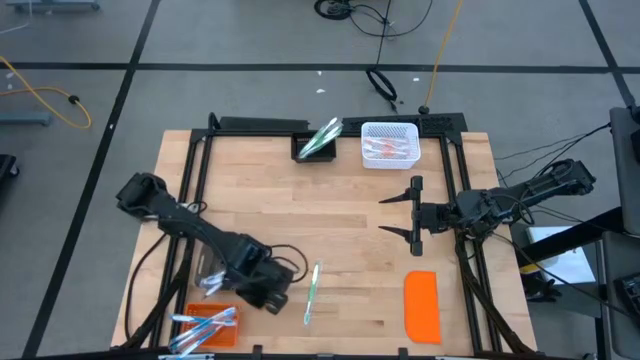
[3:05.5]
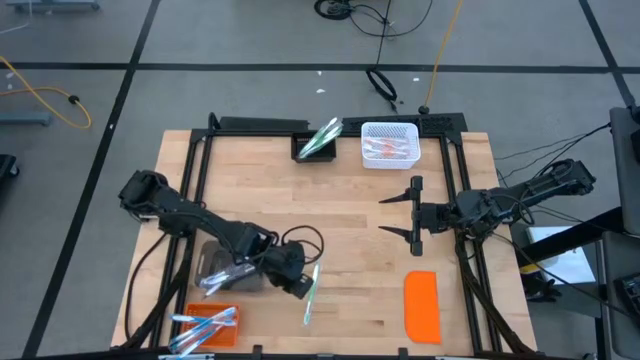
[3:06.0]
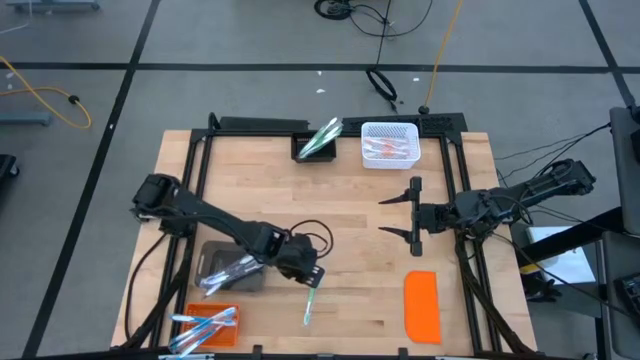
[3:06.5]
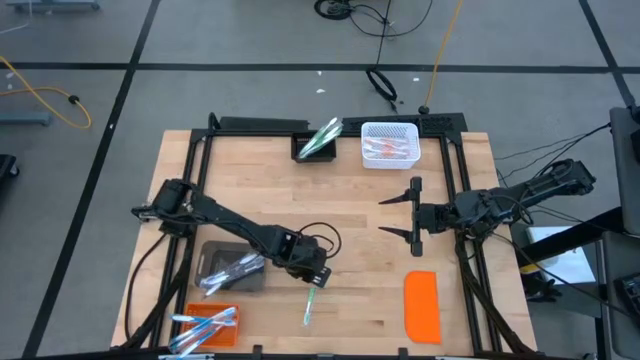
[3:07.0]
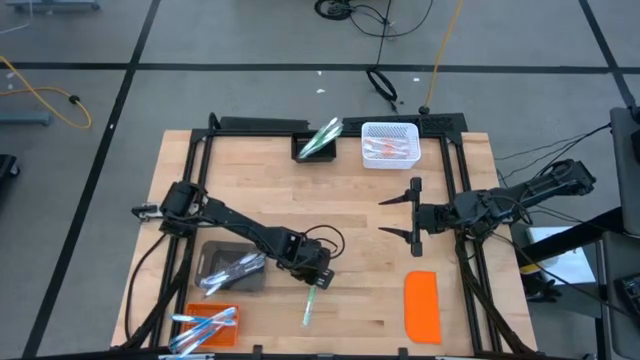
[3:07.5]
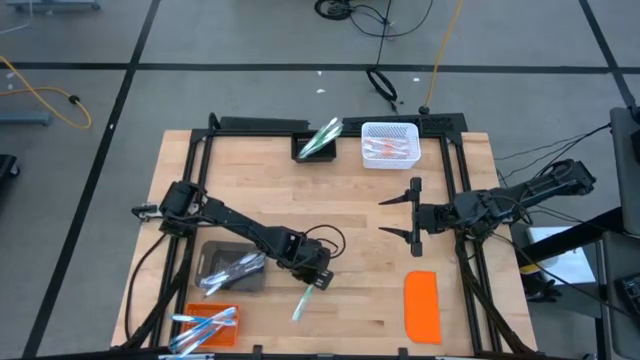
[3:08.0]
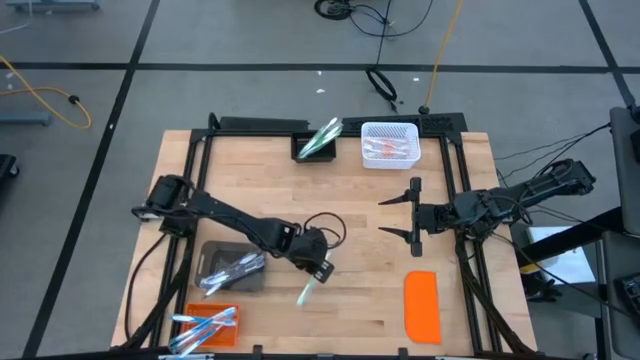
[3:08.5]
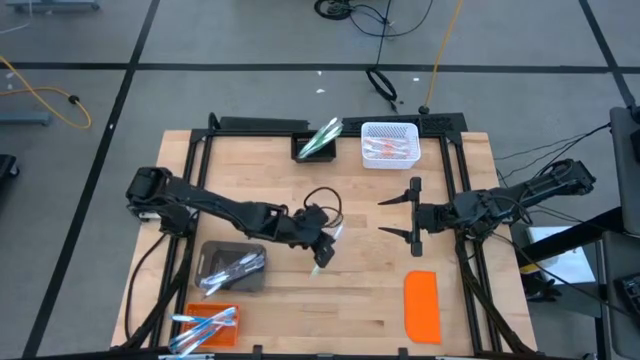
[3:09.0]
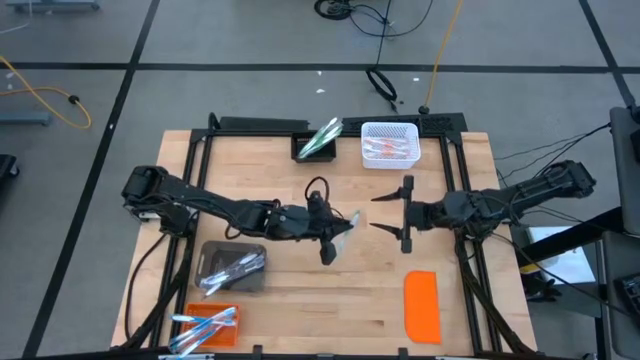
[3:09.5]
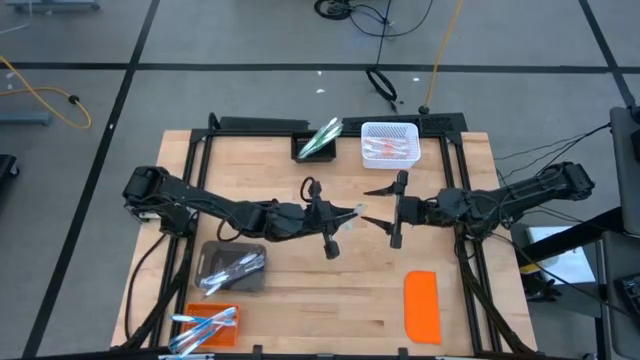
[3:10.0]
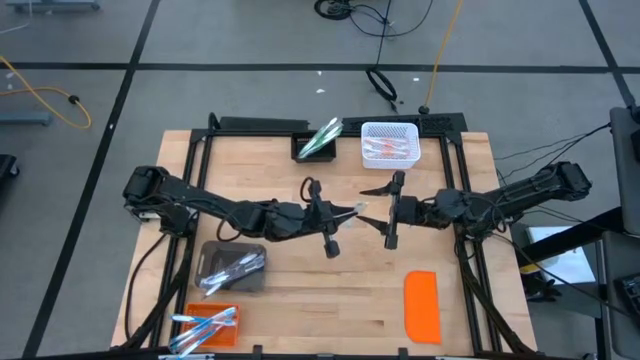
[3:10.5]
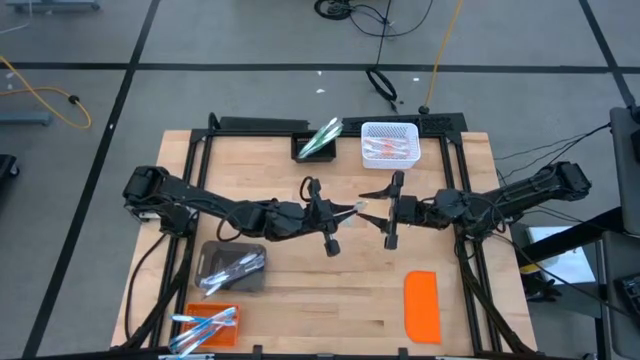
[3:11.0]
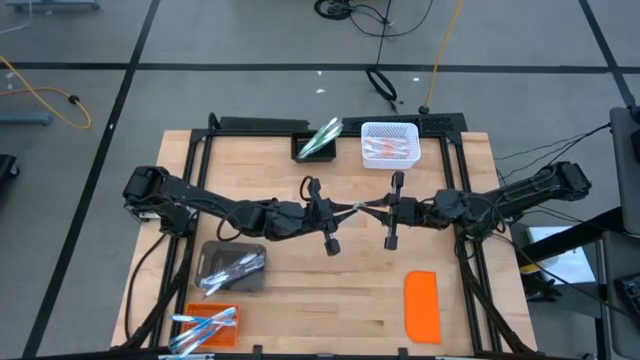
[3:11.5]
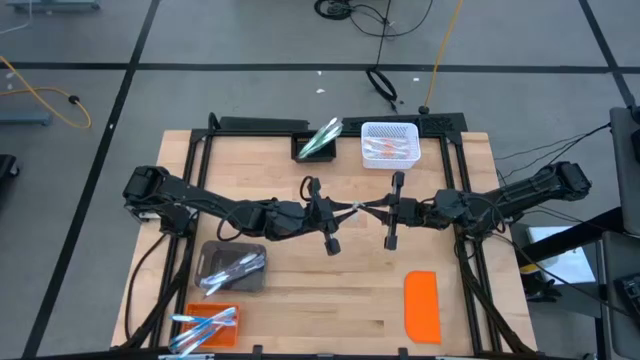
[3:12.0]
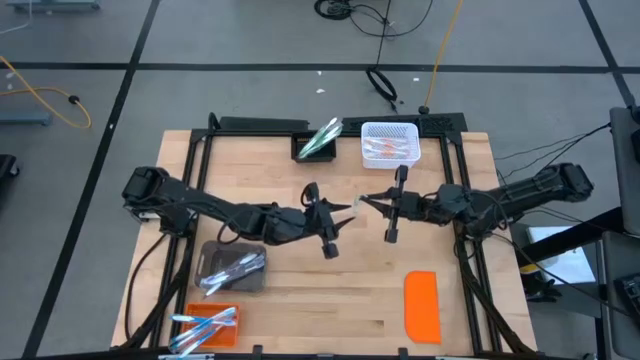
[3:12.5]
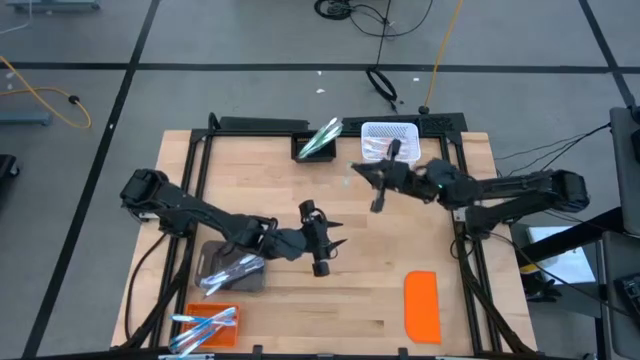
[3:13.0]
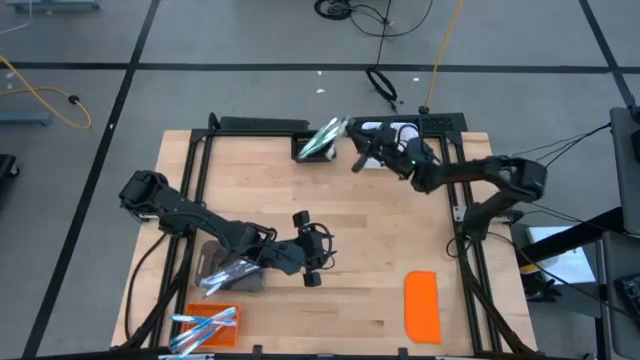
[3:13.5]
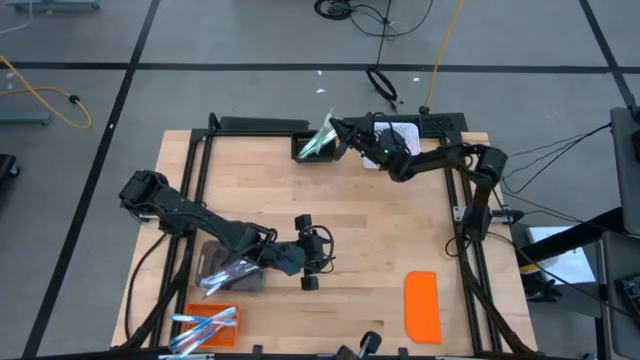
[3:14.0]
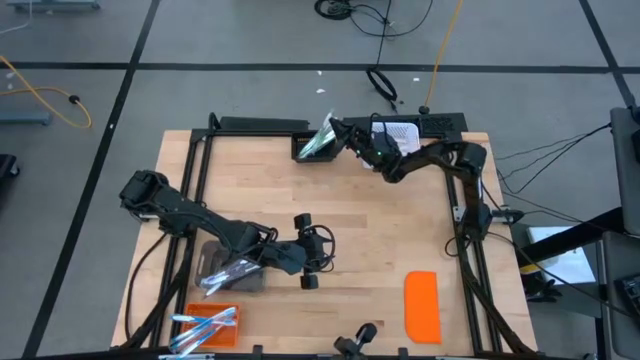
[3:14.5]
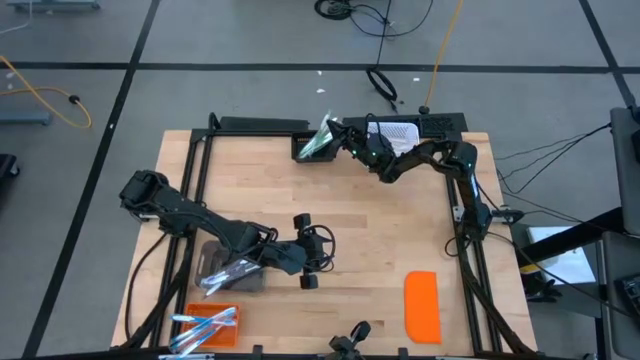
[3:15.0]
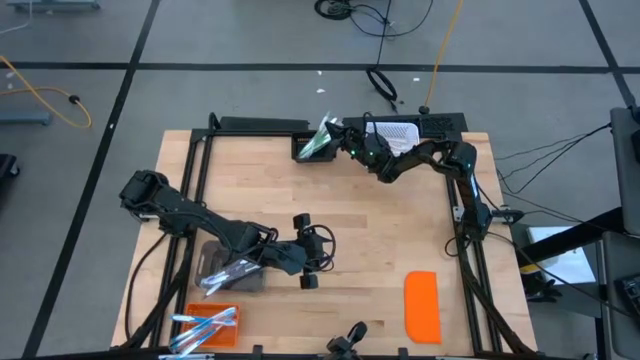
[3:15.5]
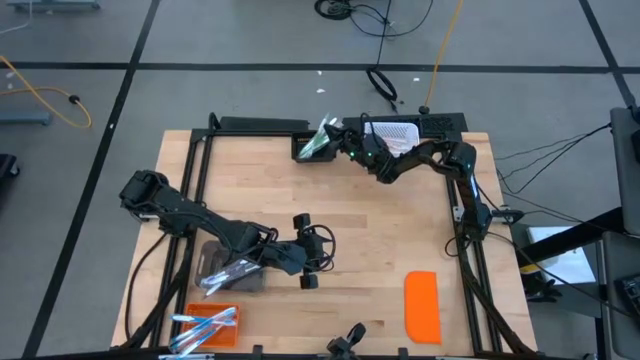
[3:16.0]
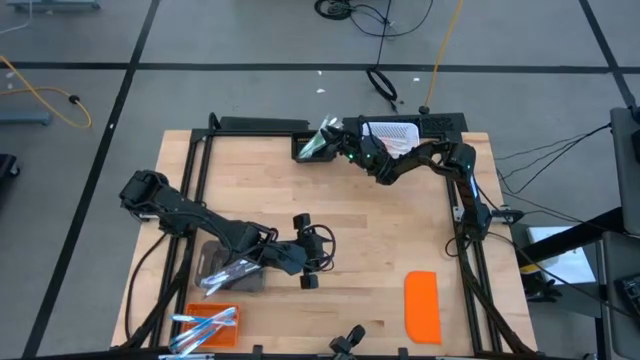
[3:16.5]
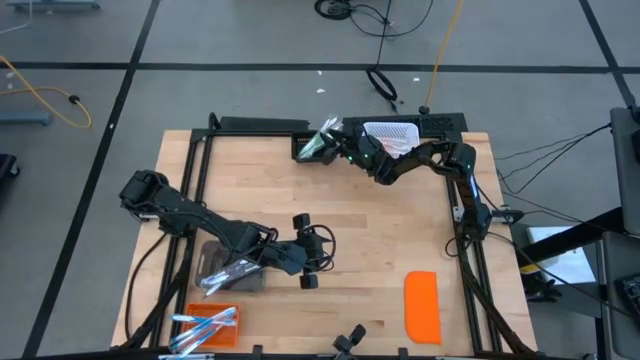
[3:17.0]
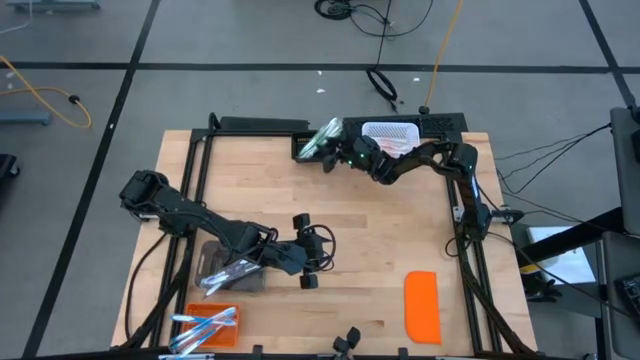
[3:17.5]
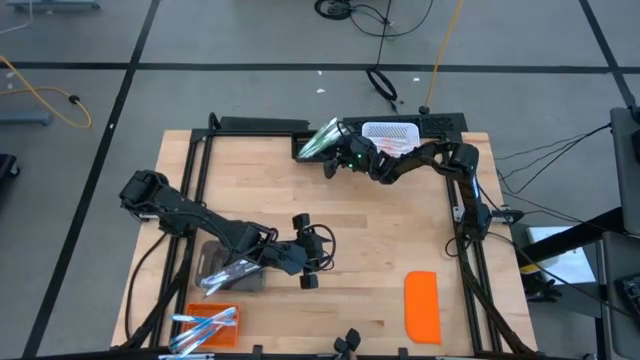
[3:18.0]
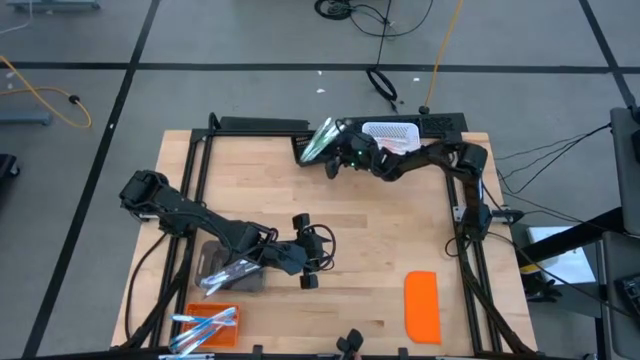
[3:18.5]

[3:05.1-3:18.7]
Task: Pick & Place Toothbrushes
Put the green toothbrush into the black bin

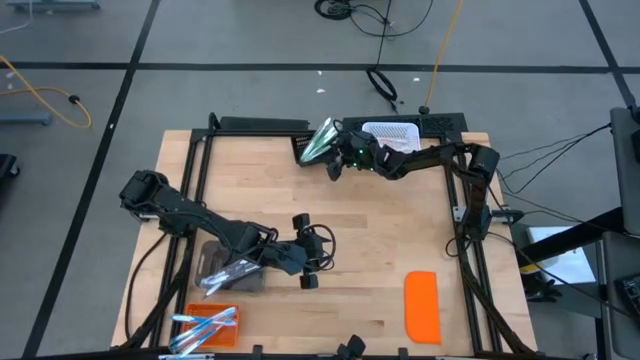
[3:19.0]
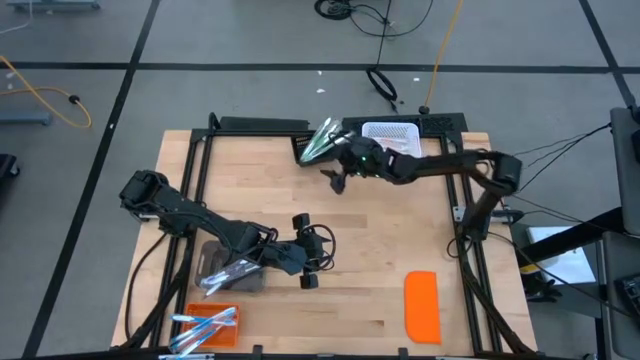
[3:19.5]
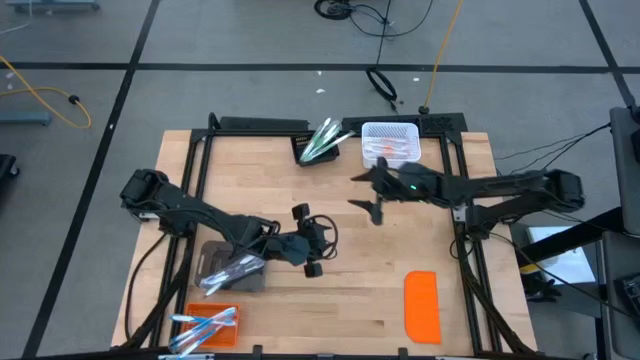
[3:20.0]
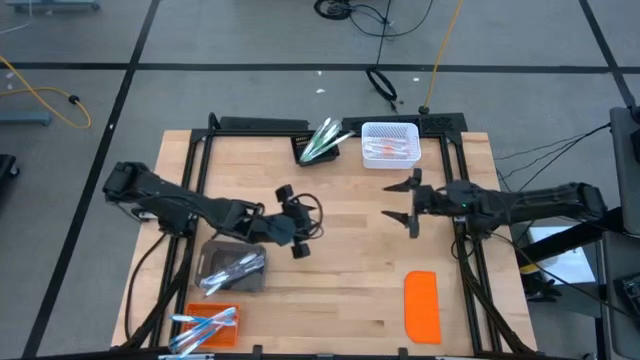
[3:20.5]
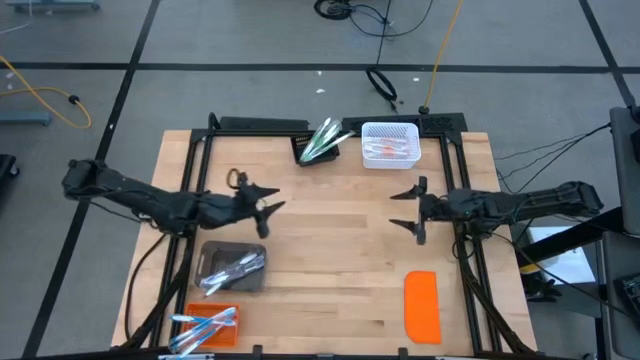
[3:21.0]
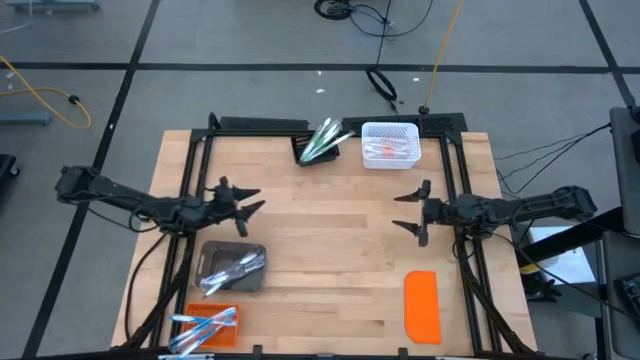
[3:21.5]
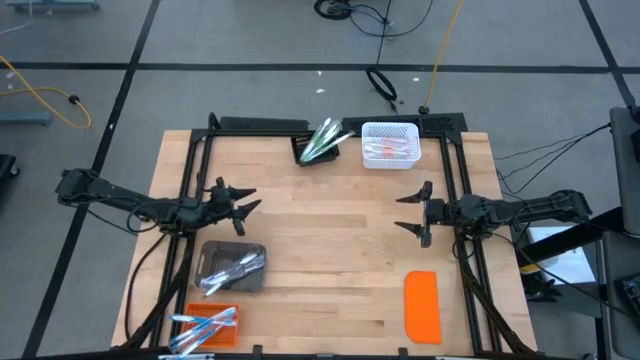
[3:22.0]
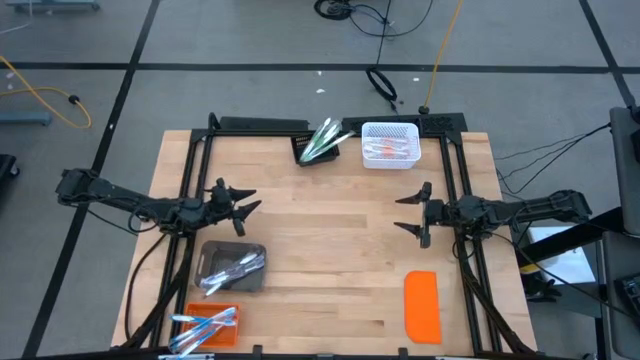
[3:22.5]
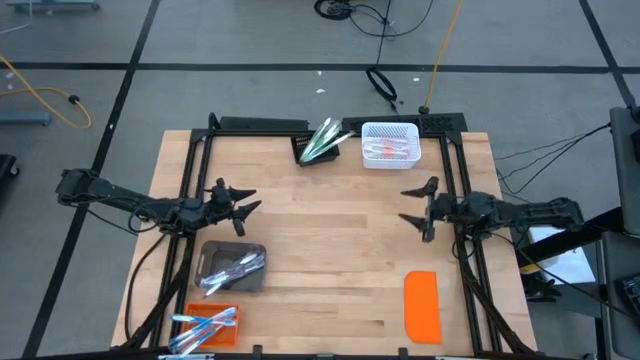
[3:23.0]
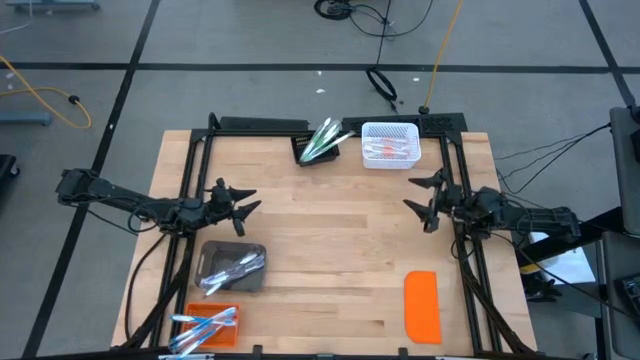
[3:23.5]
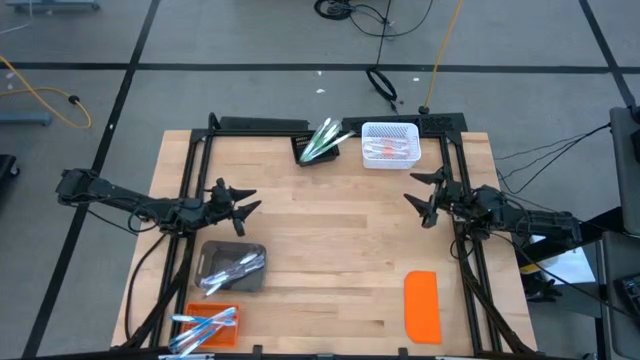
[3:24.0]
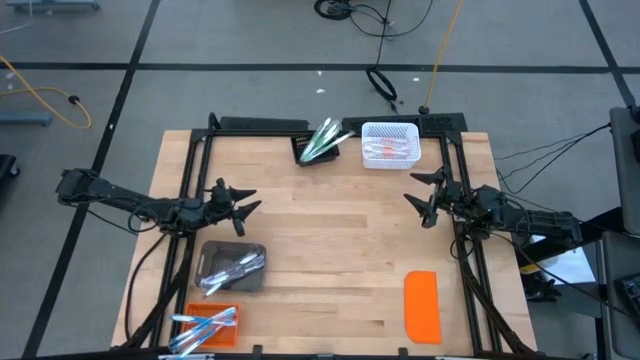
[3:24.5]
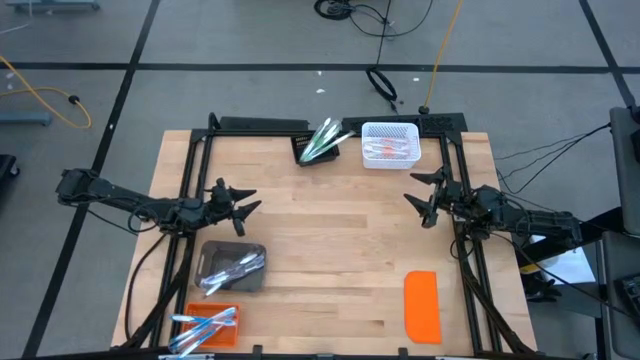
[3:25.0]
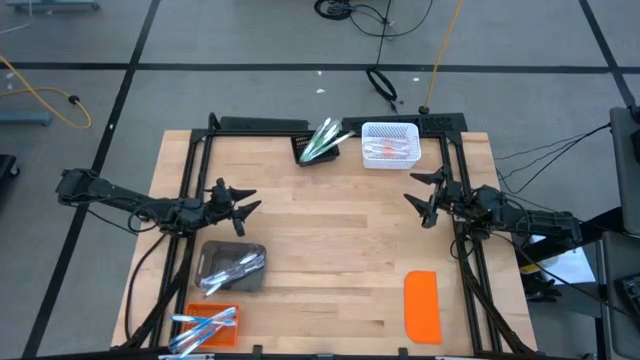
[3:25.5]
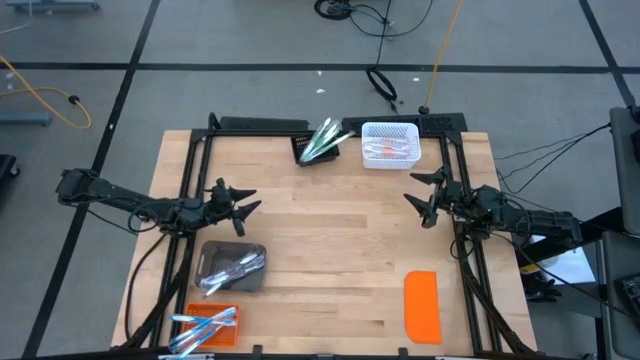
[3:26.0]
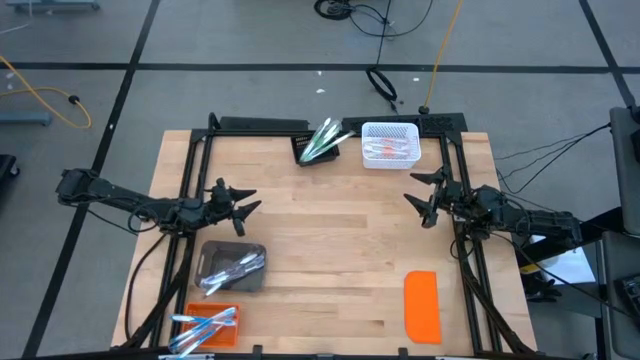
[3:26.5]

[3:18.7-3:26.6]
Return to Home Position
